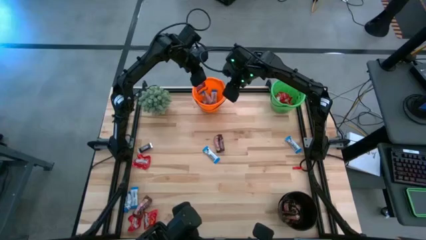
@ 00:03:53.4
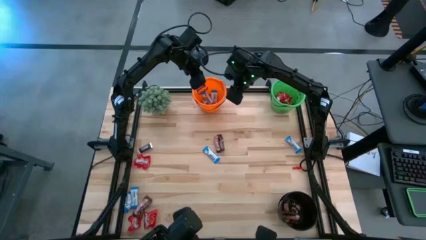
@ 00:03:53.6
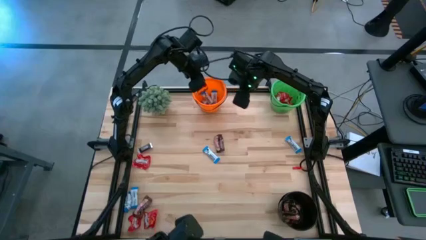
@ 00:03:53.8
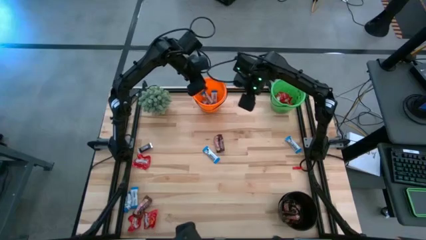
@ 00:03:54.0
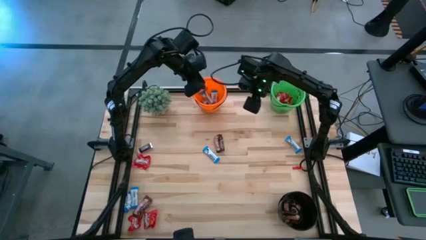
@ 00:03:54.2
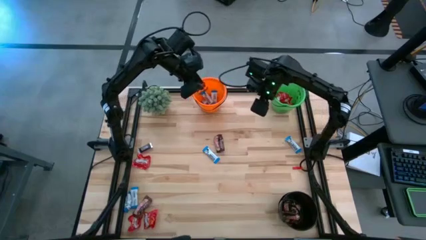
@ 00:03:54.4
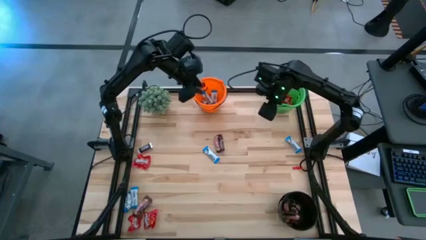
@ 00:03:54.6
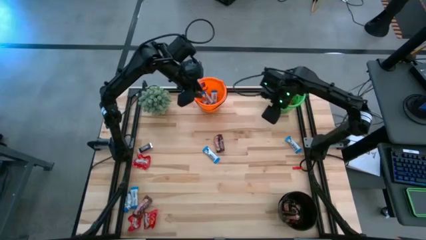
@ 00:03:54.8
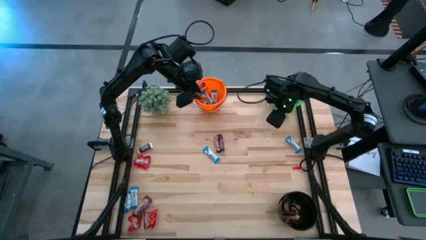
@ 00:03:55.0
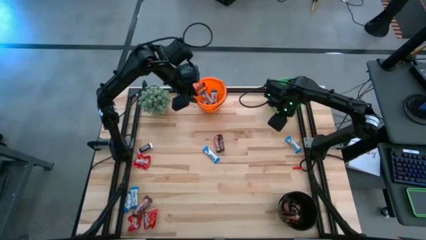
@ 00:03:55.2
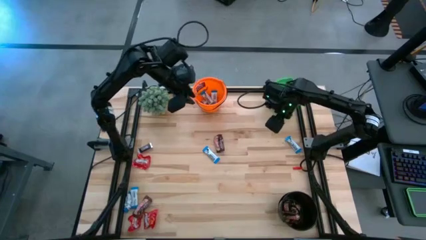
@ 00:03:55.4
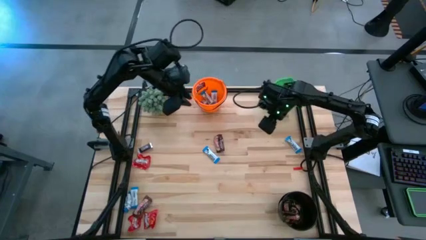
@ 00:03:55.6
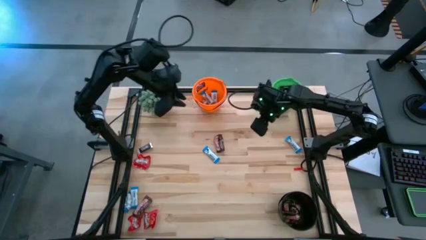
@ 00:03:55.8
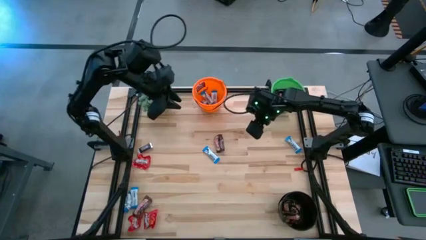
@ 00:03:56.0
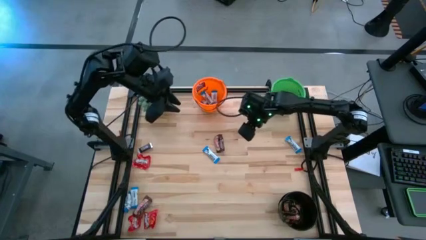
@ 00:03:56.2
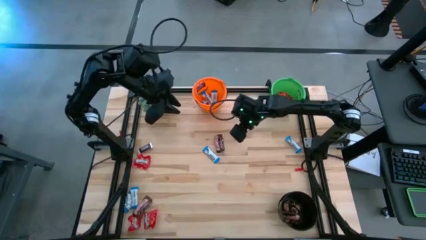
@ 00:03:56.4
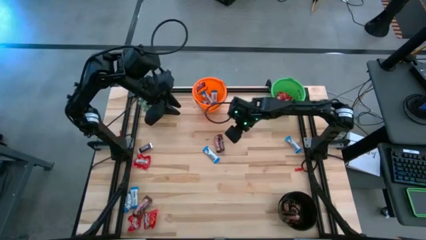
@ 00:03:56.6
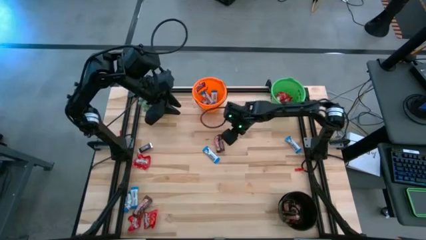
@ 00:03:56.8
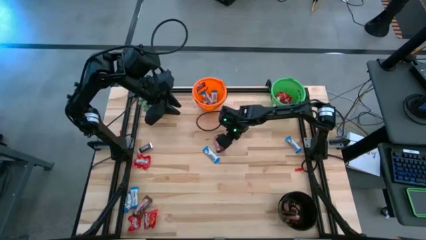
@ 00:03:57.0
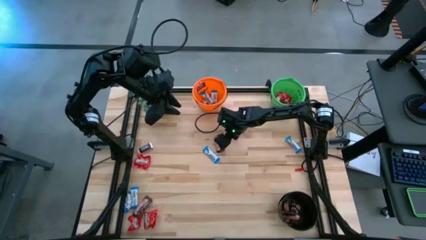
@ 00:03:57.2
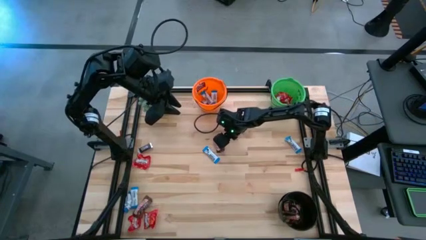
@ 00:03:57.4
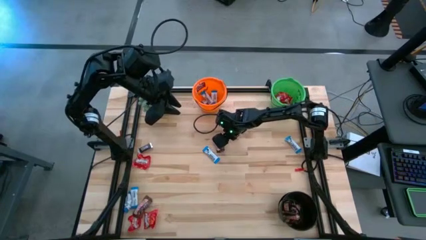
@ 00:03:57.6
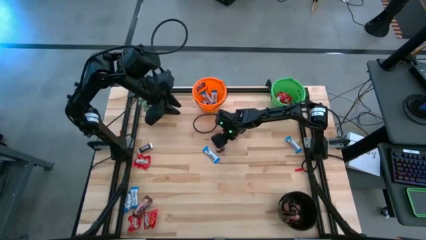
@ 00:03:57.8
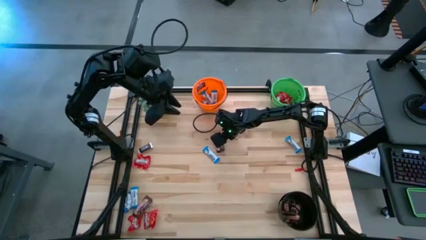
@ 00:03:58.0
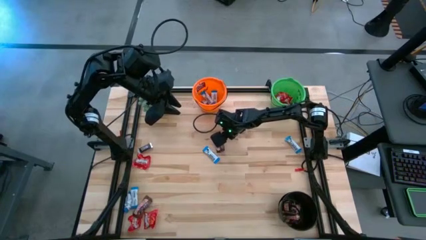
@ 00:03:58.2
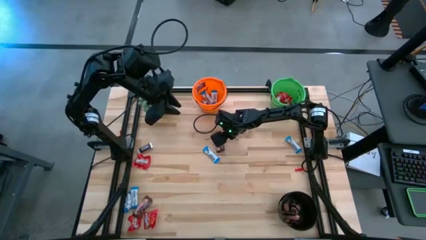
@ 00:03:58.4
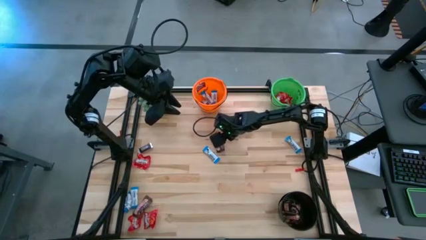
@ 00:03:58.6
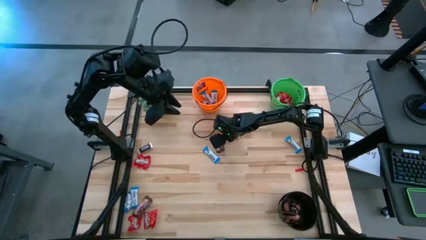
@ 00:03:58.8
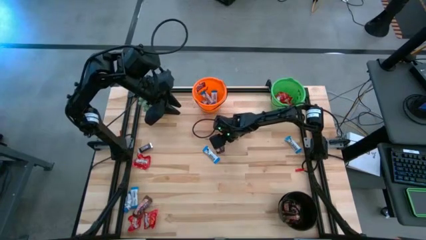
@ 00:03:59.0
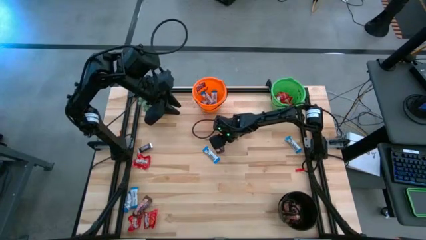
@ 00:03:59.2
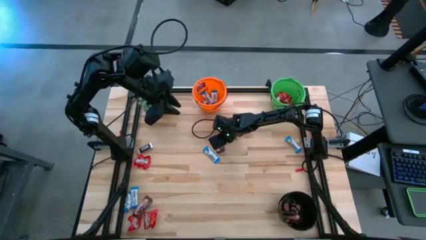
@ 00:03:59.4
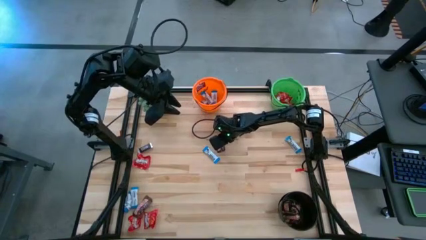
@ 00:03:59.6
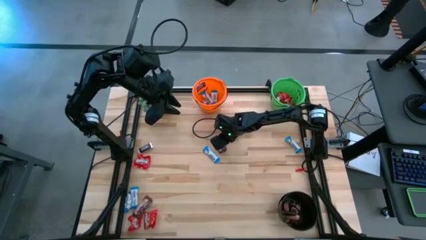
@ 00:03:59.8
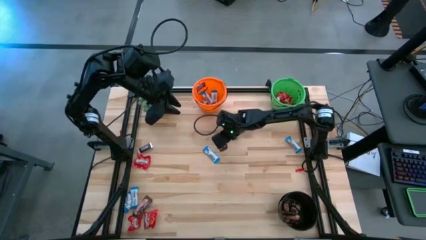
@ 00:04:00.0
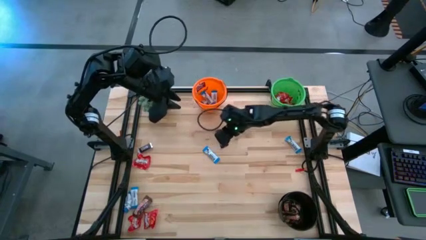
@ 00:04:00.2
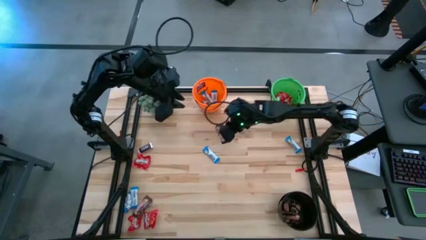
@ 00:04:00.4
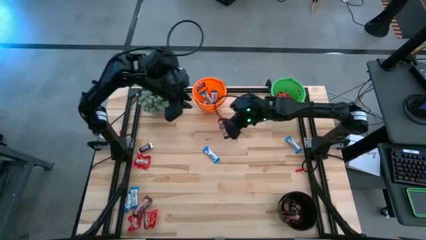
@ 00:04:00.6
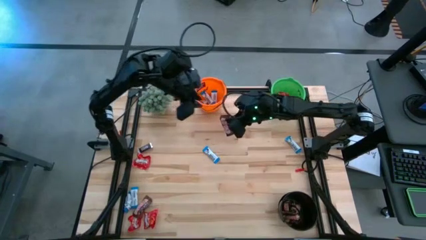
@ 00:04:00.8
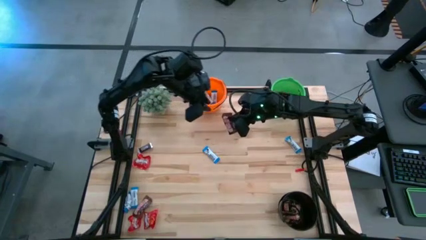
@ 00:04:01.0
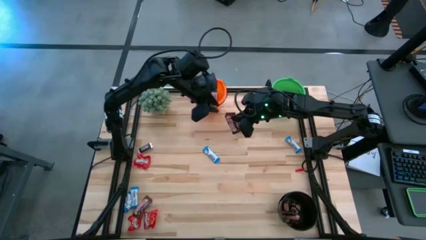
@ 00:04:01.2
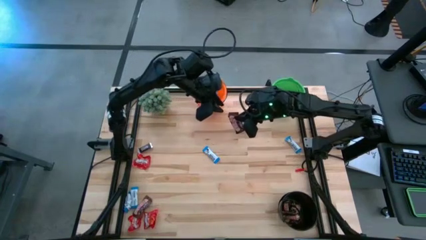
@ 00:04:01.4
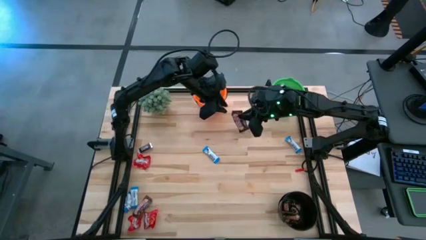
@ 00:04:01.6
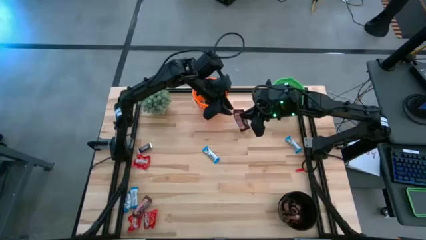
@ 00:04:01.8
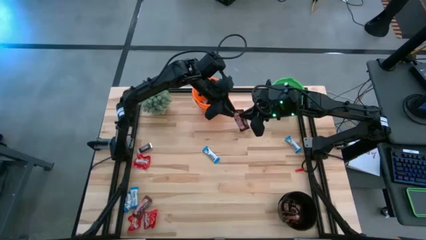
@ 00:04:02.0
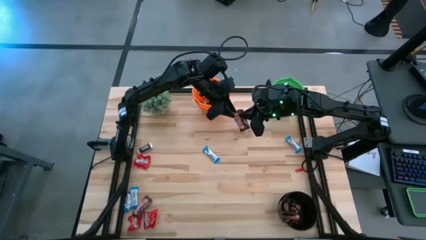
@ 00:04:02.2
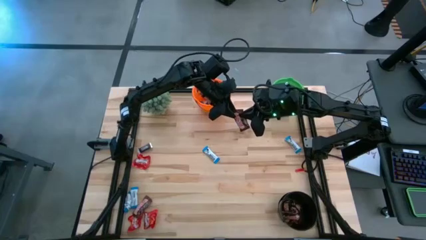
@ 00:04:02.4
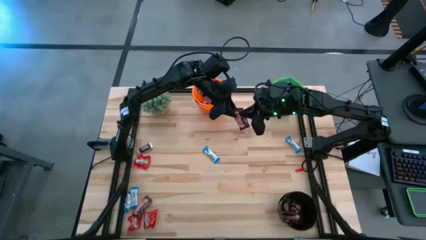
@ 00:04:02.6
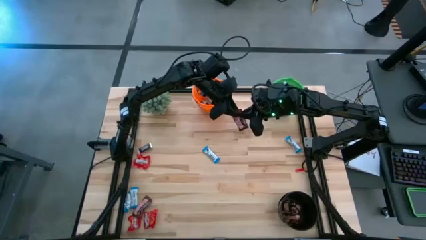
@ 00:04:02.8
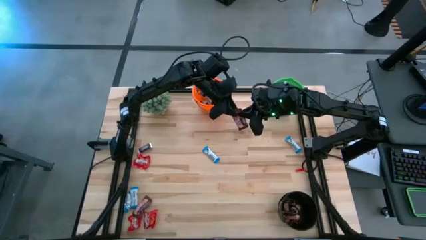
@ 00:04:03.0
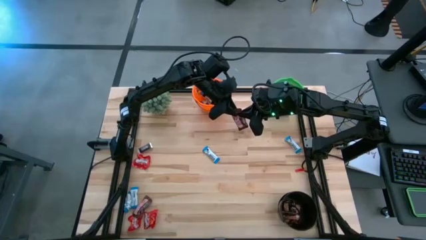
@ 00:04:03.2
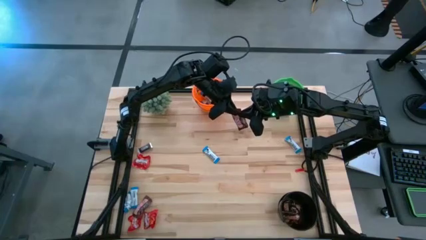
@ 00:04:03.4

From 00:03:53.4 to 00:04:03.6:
Task: Organize candy in baskets
Put the brown chocolate bar into the black bucket
